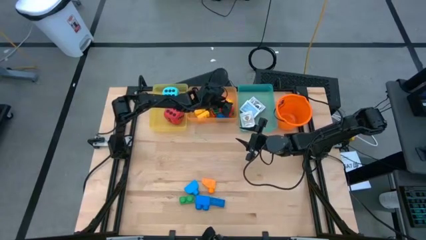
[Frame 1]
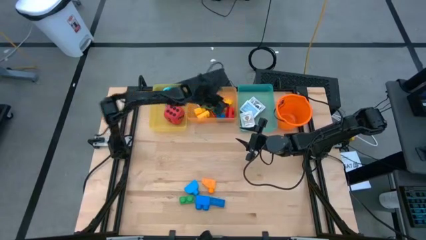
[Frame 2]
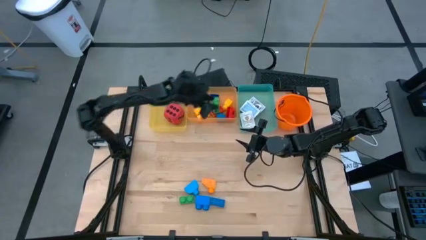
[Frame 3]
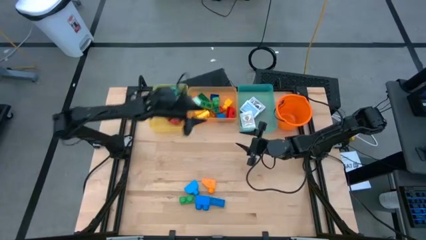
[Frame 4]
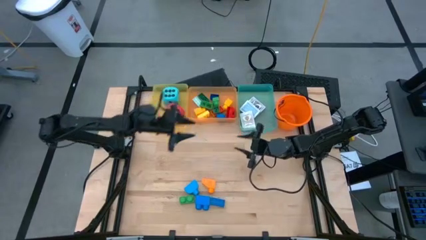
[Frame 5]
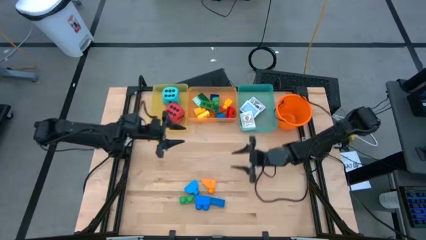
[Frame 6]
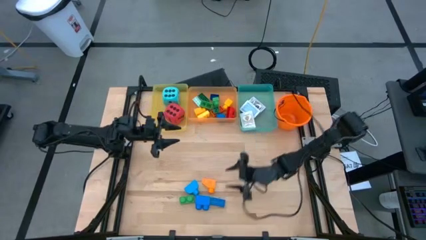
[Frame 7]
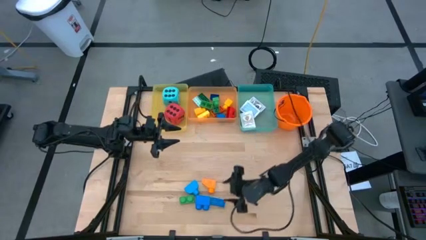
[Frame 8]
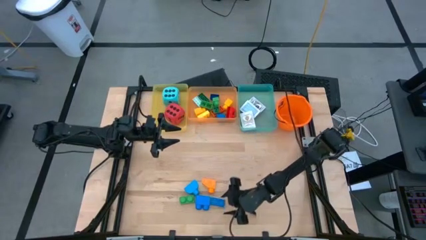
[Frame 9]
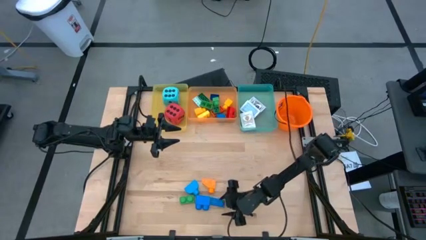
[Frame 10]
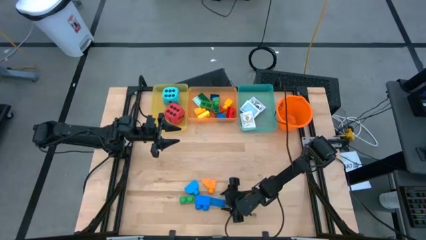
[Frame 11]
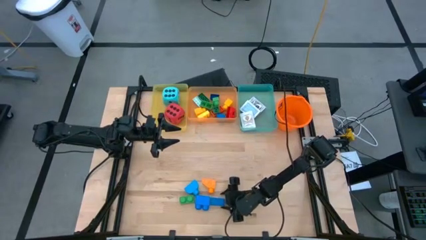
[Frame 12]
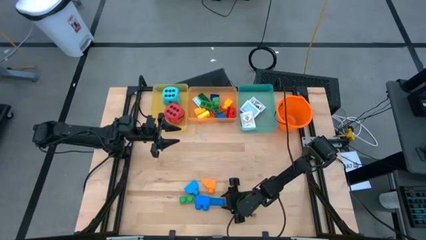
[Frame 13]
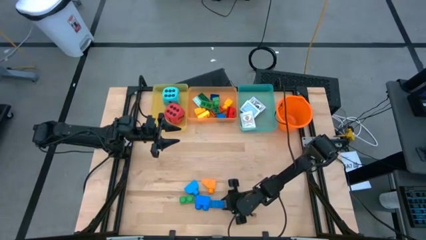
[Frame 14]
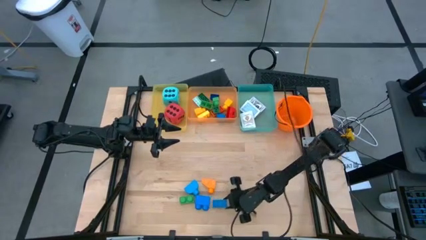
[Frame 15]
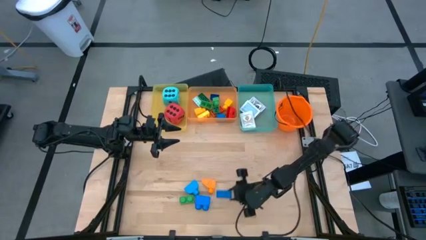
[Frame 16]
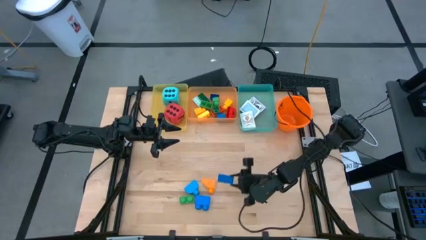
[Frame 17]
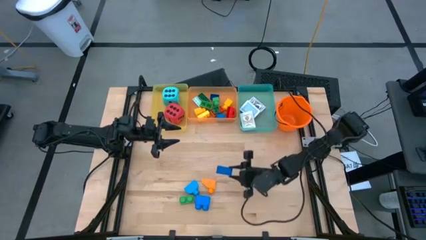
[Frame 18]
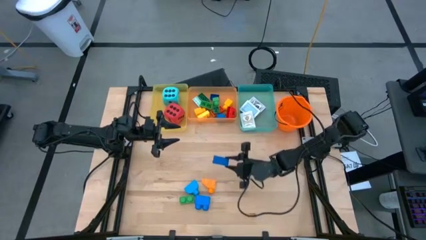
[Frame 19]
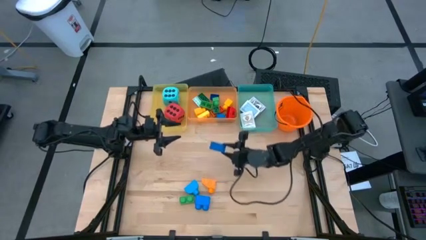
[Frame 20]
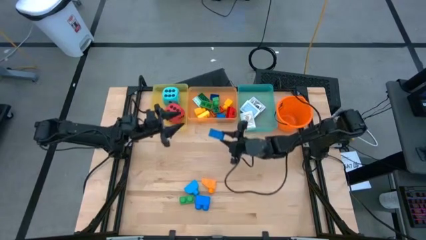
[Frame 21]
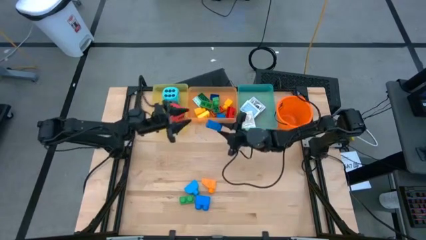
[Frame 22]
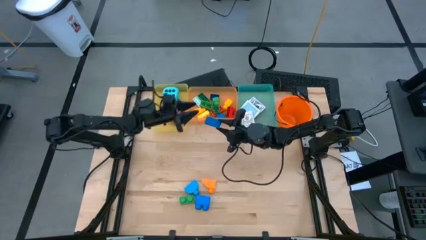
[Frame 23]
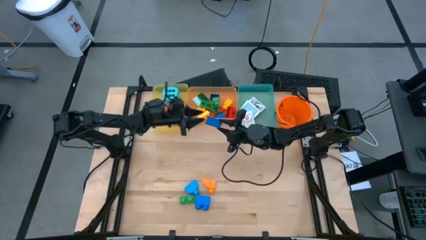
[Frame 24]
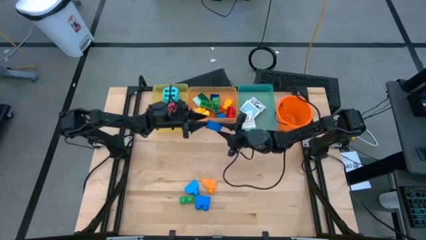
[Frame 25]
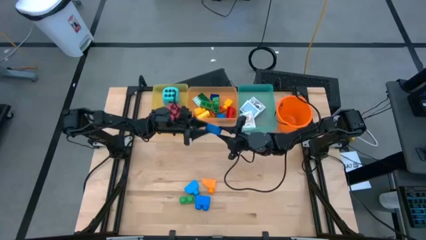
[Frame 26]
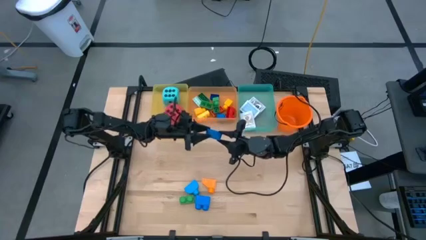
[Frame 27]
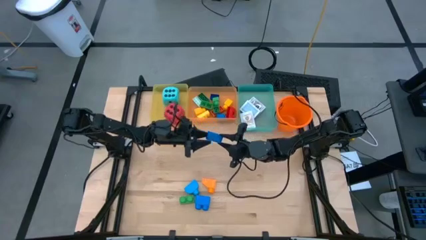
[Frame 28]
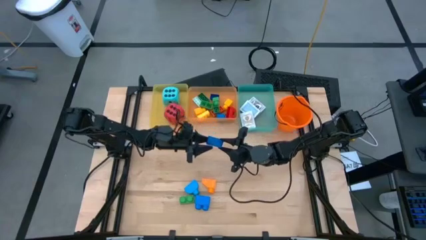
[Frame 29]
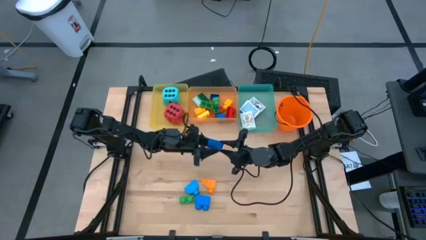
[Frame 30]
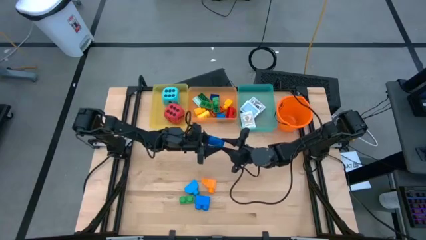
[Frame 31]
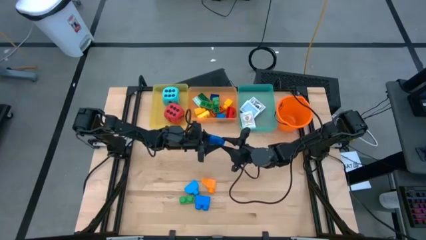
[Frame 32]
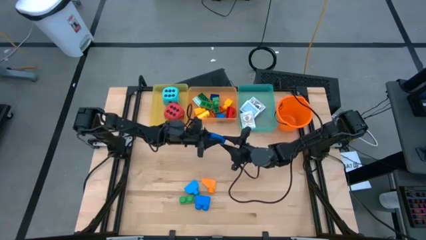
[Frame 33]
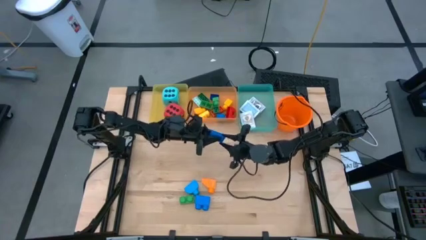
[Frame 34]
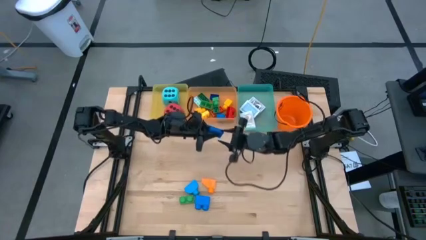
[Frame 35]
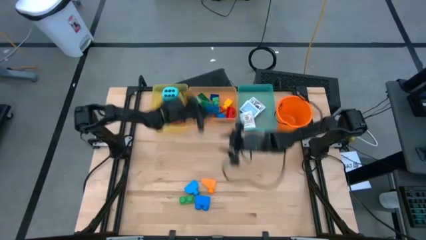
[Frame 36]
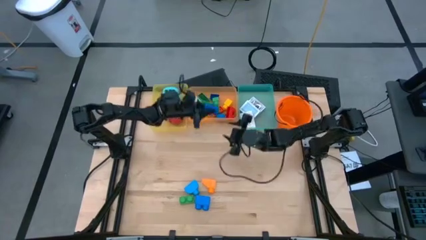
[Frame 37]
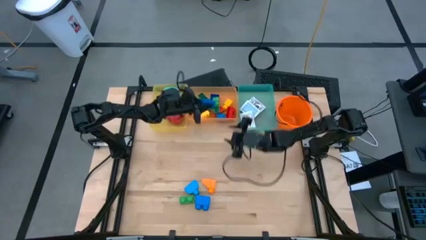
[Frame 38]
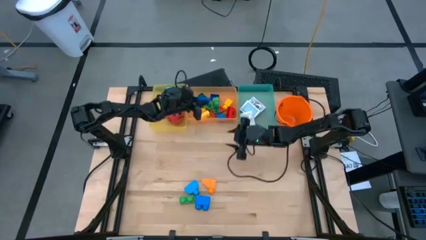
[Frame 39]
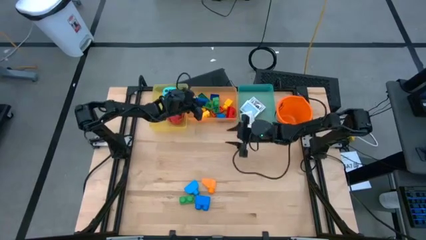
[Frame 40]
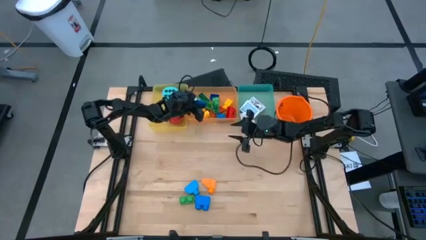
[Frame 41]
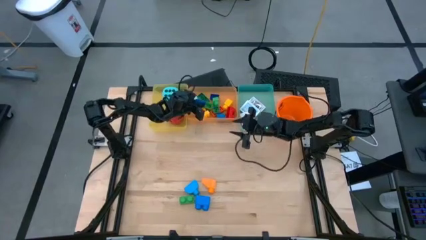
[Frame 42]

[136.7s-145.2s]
Task: Pick & Place Toys
Put the blue game piece into the orange bin

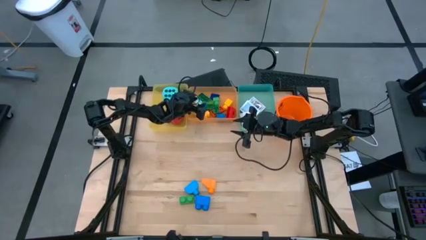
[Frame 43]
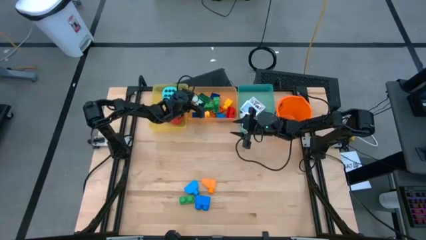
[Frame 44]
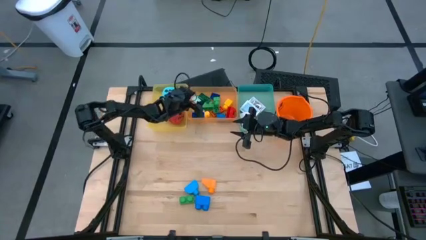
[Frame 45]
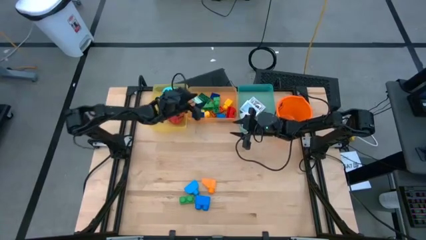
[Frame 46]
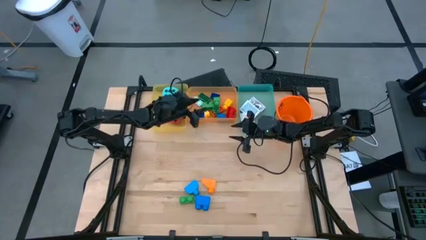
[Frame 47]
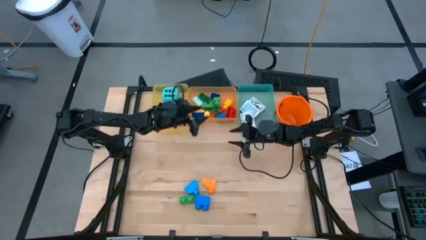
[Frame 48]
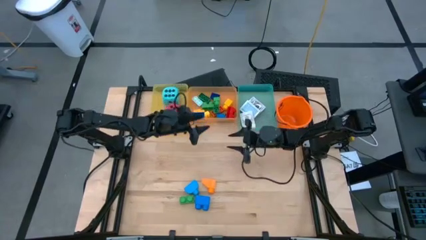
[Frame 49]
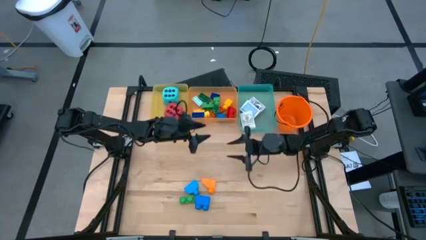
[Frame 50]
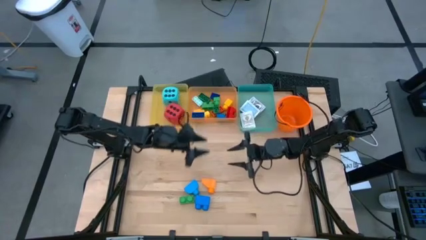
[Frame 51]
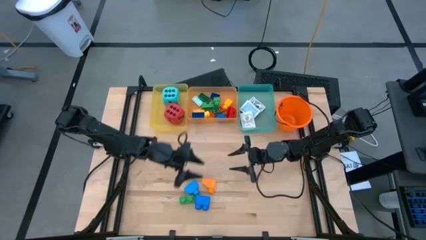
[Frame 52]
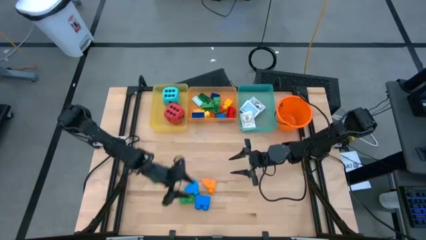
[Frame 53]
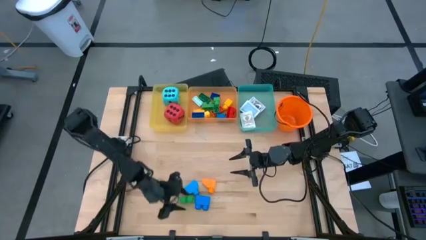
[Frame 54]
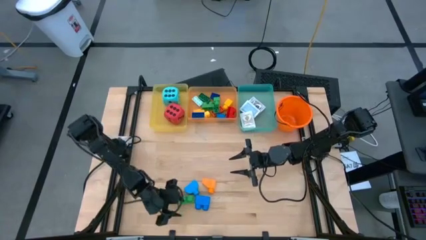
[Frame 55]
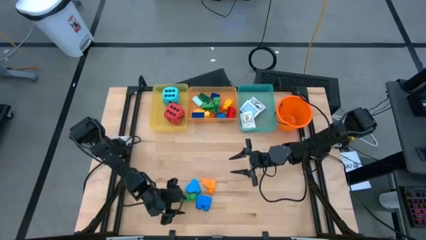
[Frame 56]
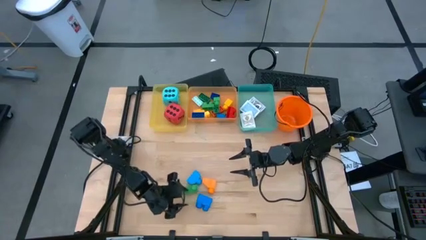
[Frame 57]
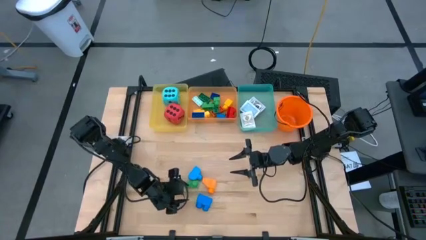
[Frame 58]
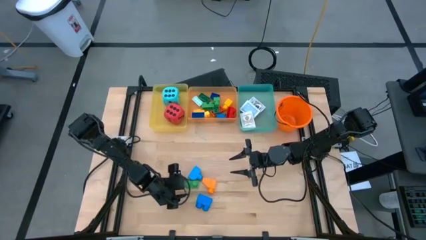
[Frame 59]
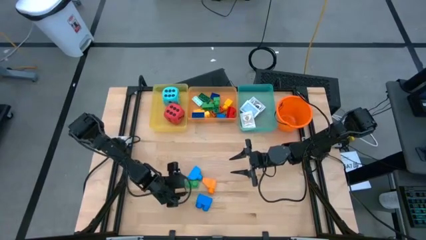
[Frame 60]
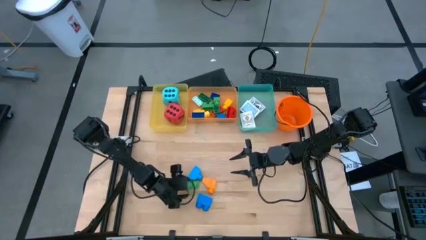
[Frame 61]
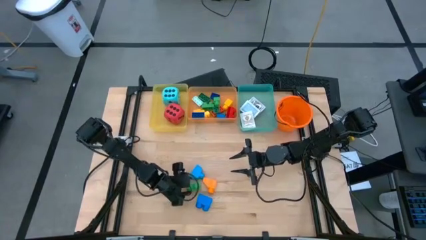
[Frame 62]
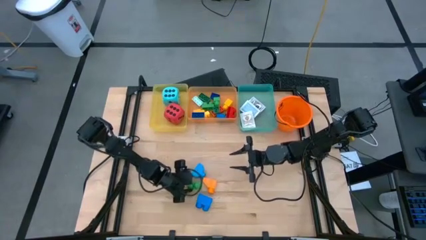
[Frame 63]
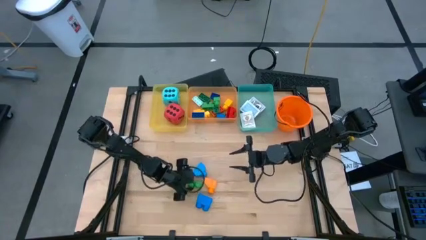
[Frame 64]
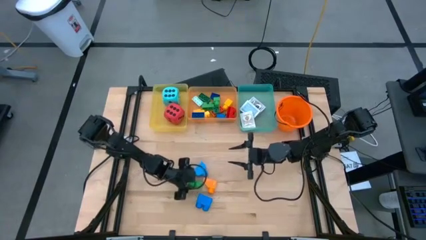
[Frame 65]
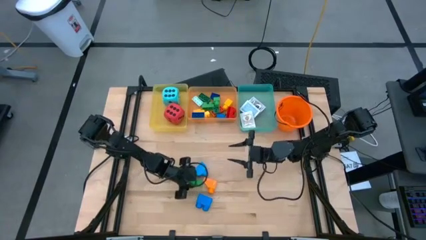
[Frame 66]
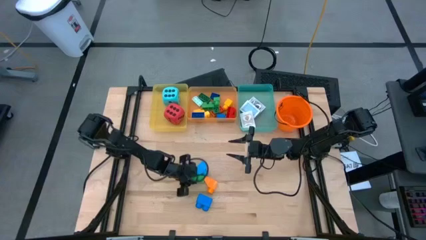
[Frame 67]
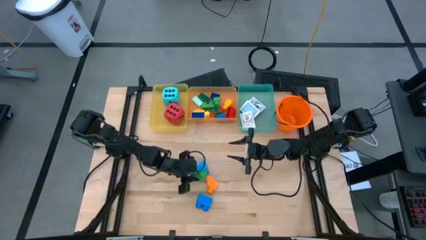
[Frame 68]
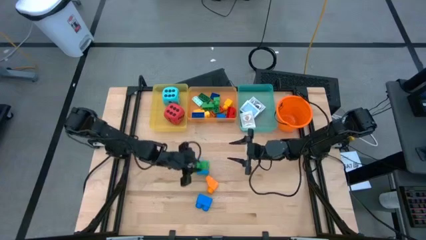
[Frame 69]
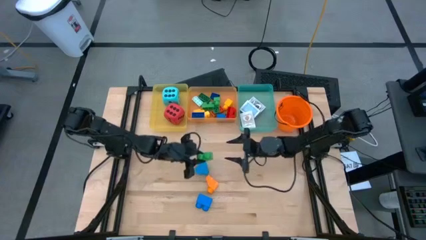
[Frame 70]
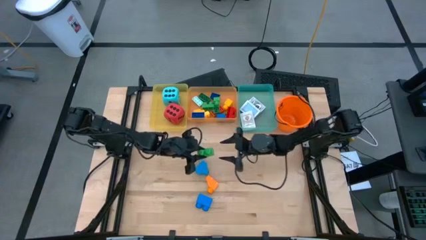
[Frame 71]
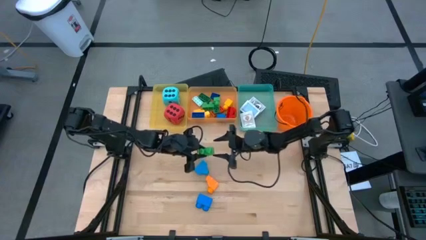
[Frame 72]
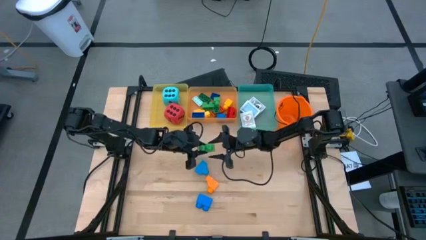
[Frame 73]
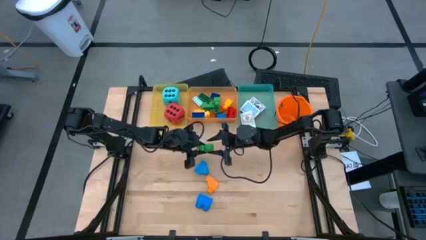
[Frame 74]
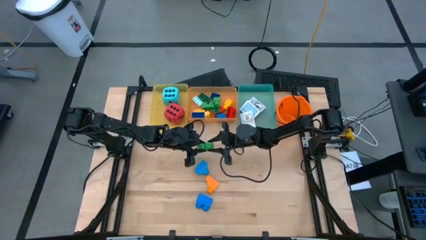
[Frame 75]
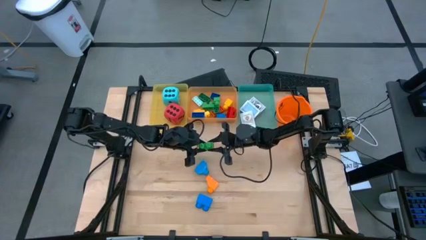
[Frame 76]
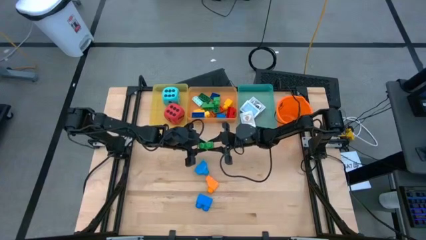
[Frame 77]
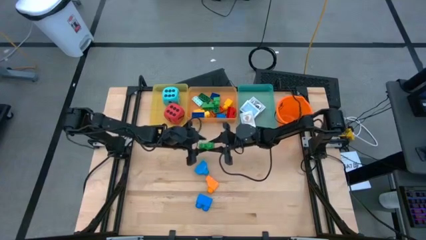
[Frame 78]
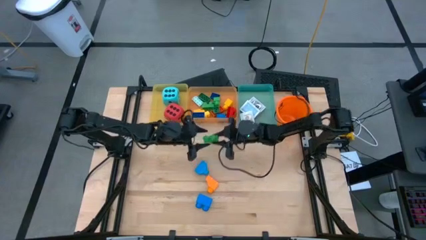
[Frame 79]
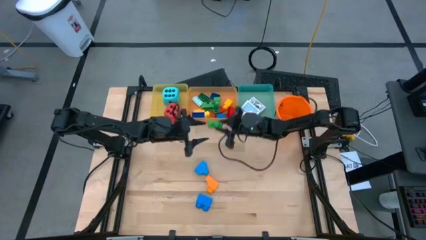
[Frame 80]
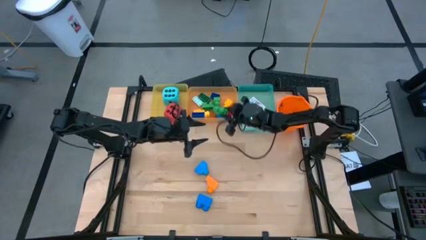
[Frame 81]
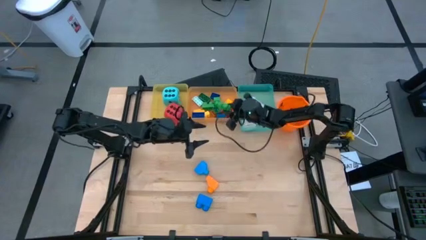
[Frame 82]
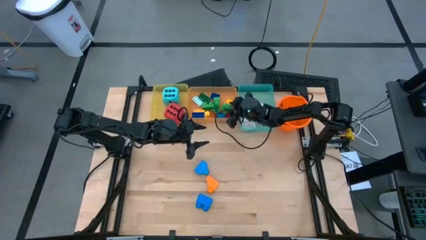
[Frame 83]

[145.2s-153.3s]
Put the green game piece into the orange bin
